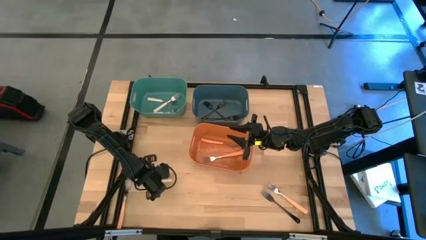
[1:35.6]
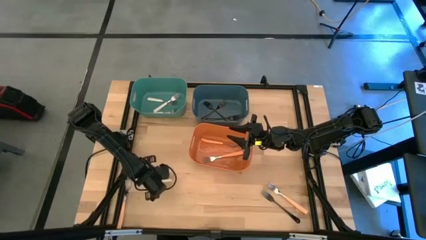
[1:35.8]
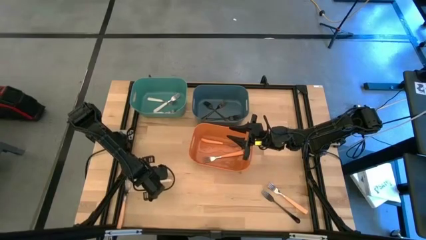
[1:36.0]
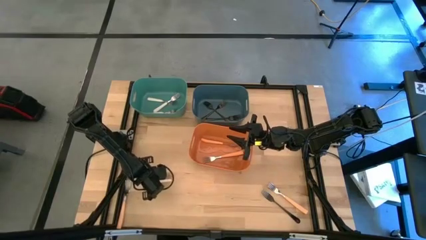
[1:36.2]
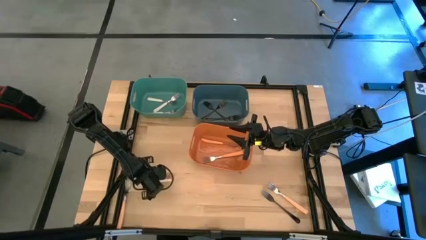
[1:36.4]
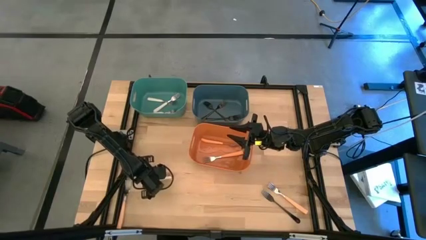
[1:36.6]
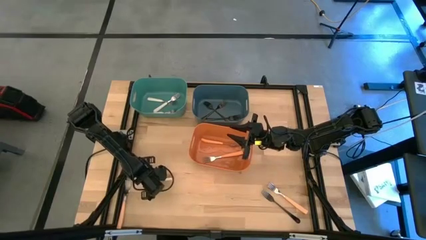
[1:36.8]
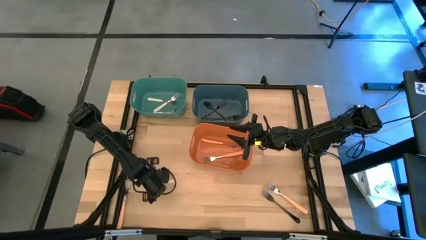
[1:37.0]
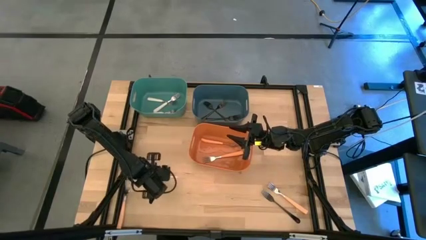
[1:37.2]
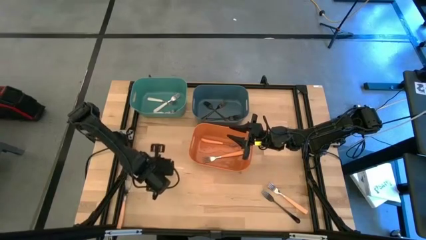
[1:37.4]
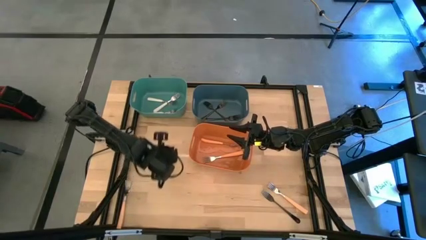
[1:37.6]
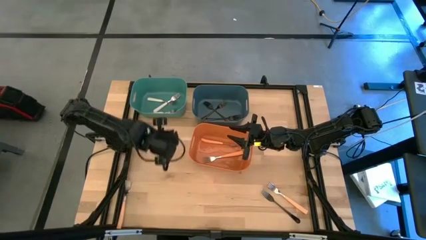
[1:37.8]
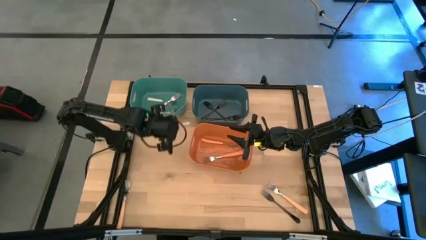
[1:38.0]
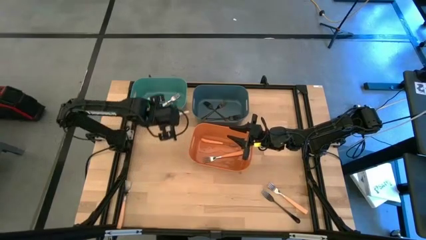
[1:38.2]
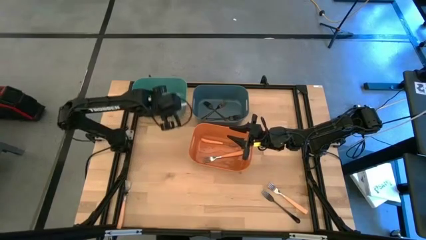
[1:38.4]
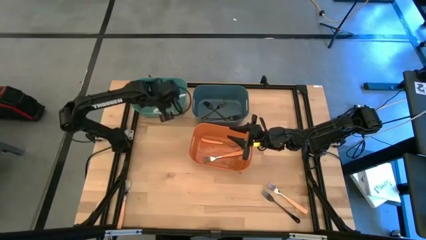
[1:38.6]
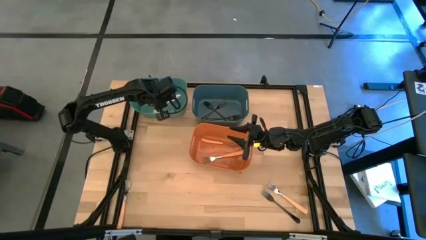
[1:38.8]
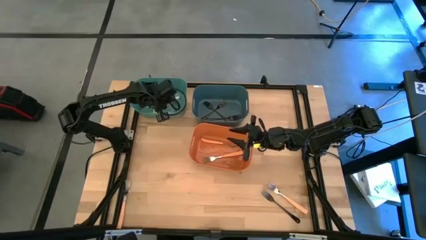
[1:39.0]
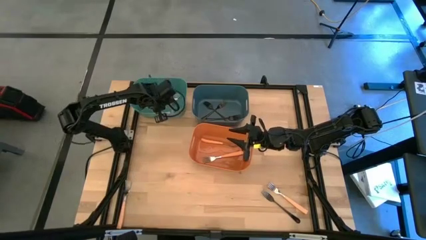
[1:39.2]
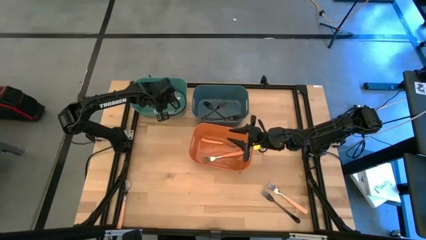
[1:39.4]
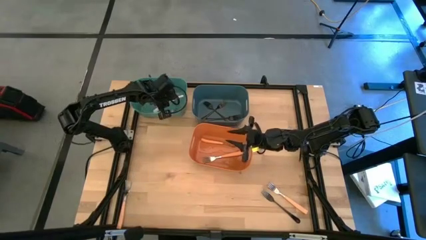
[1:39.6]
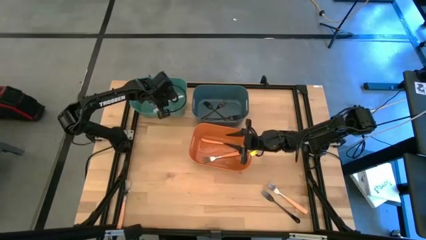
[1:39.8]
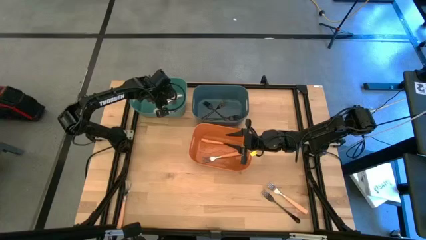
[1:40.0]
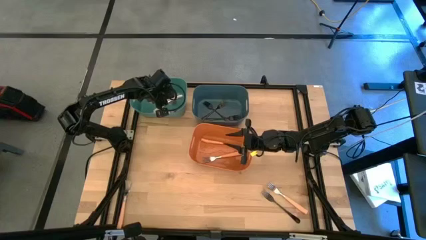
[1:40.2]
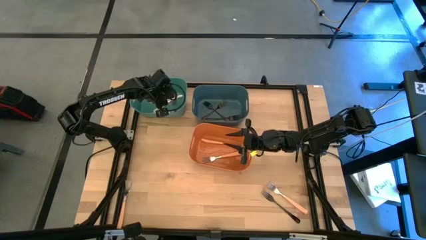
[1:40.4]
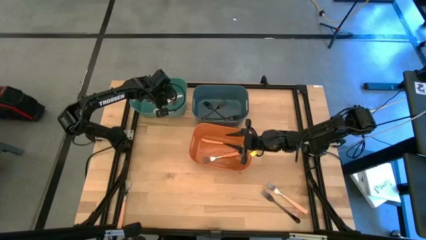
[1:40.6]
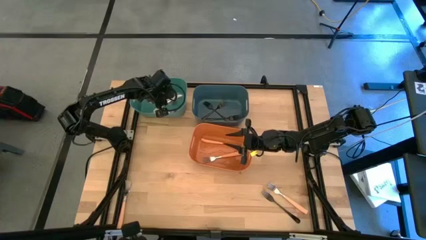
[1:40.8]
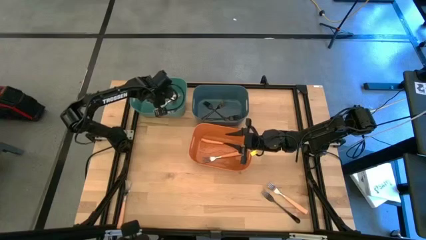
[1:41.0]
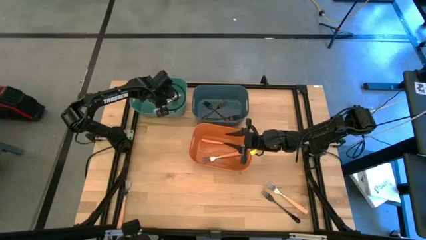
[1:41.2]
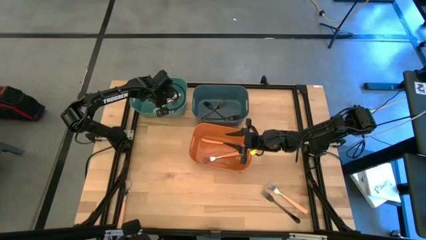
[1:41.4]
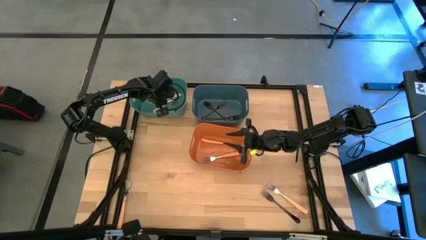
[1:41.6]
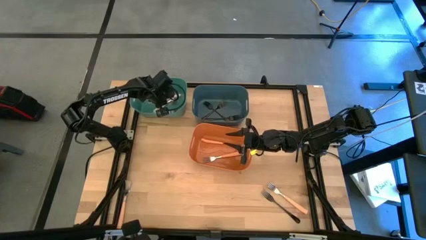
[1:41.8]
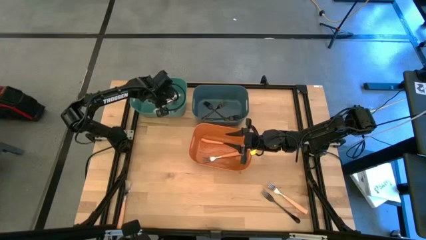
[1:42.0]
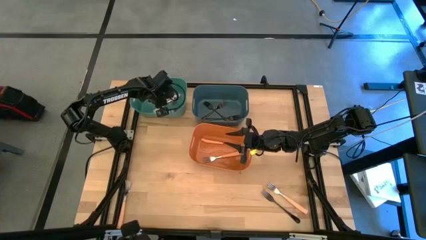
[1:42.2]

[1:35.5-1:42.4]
Task: Sort silverware by color (type)
Put the white fork into the green bin

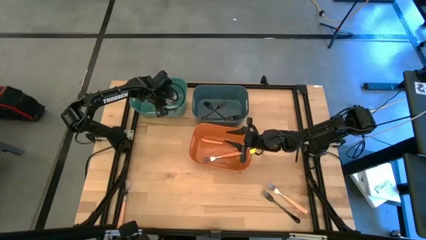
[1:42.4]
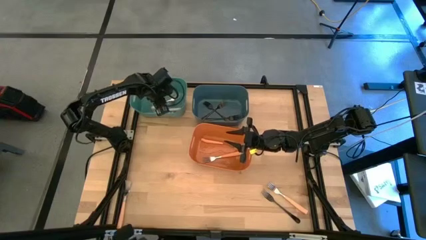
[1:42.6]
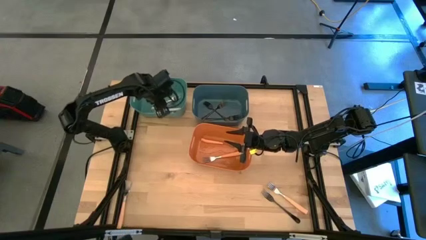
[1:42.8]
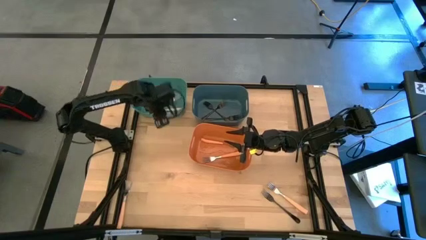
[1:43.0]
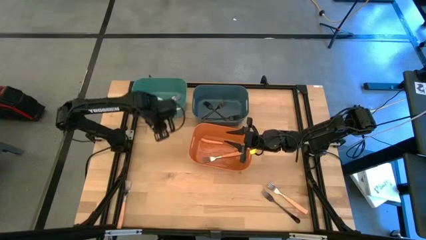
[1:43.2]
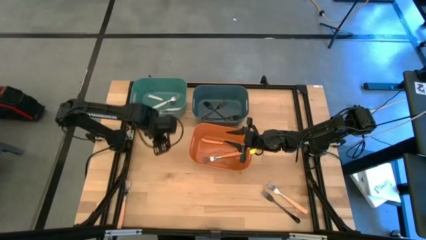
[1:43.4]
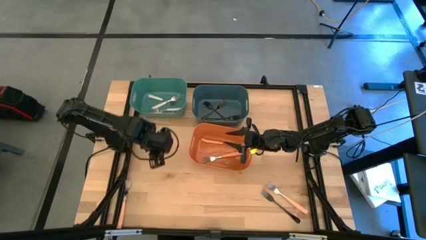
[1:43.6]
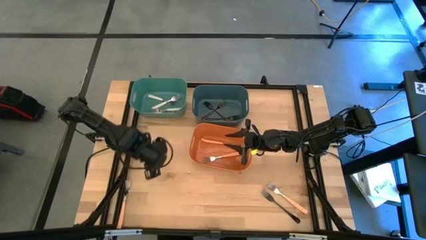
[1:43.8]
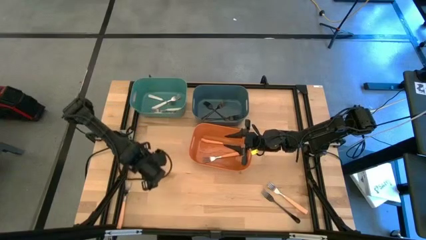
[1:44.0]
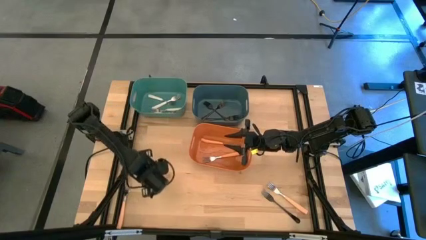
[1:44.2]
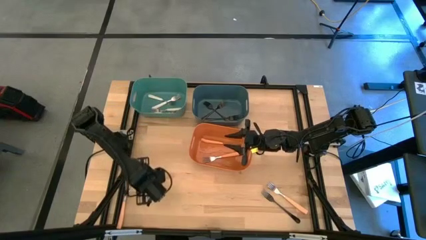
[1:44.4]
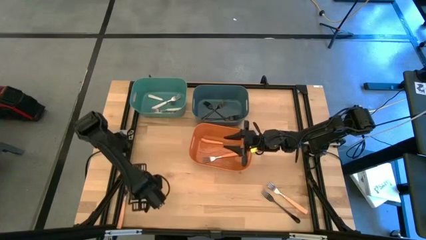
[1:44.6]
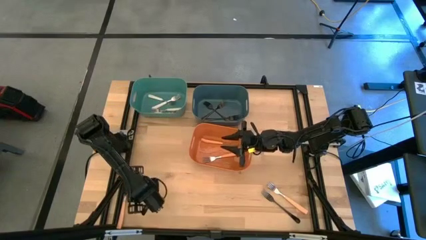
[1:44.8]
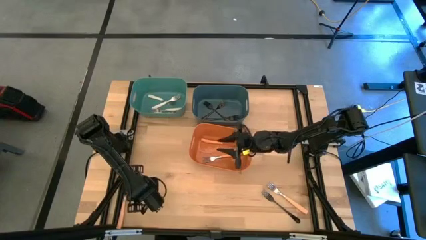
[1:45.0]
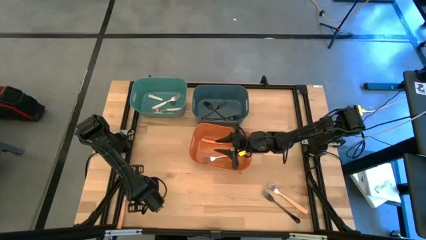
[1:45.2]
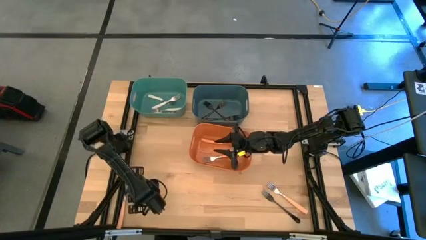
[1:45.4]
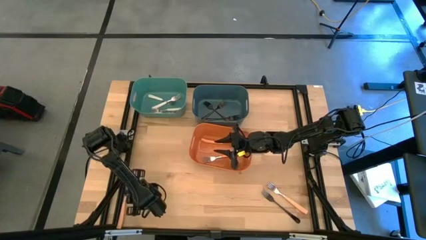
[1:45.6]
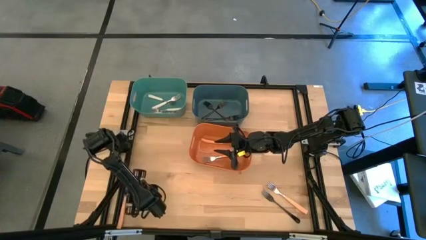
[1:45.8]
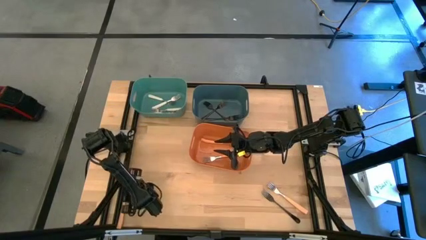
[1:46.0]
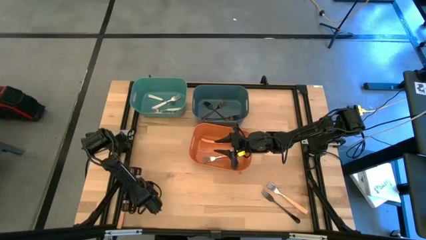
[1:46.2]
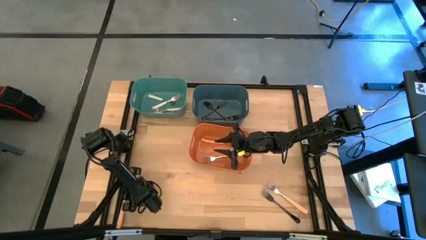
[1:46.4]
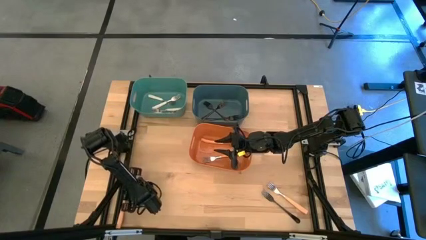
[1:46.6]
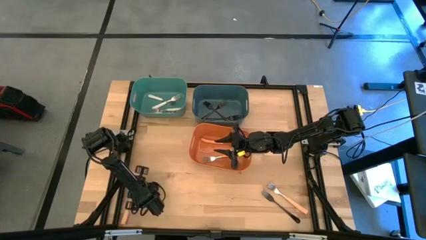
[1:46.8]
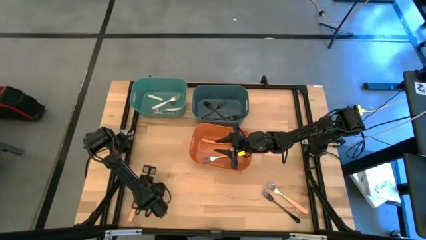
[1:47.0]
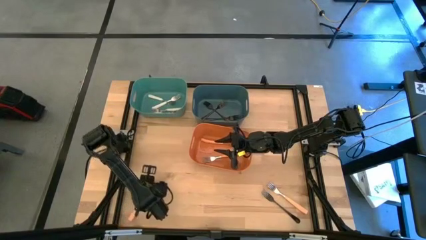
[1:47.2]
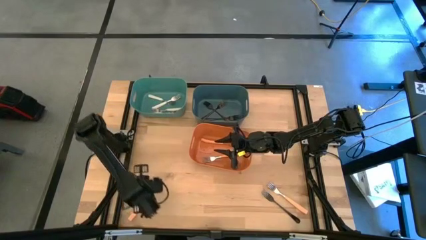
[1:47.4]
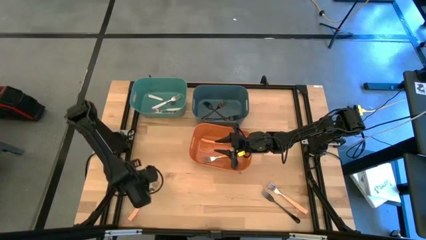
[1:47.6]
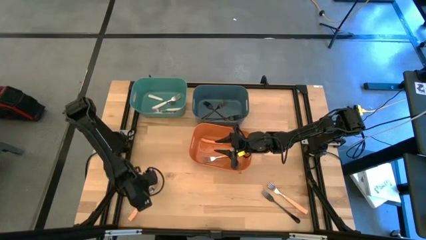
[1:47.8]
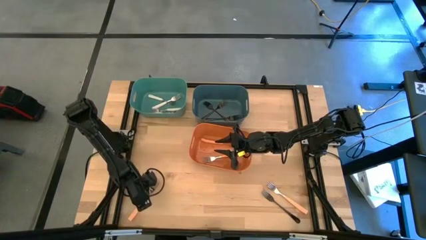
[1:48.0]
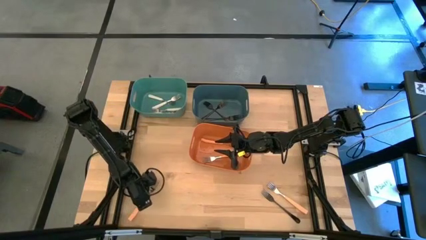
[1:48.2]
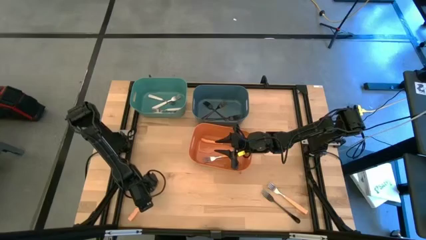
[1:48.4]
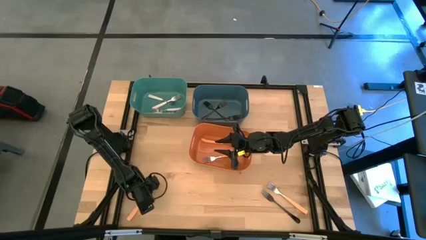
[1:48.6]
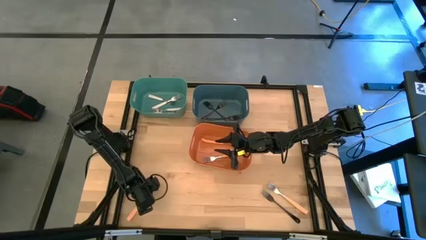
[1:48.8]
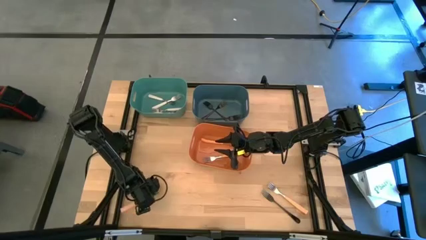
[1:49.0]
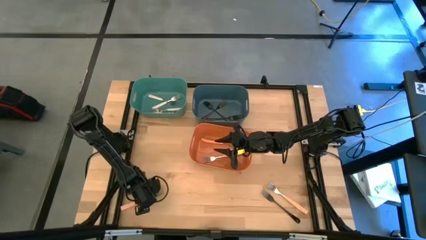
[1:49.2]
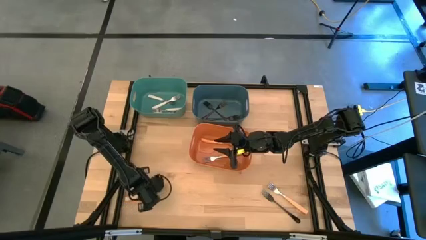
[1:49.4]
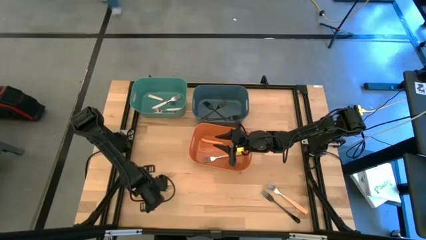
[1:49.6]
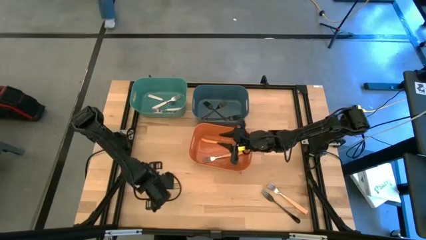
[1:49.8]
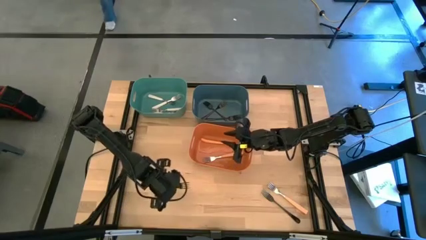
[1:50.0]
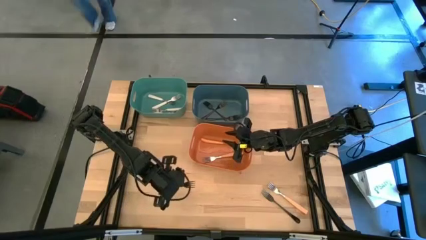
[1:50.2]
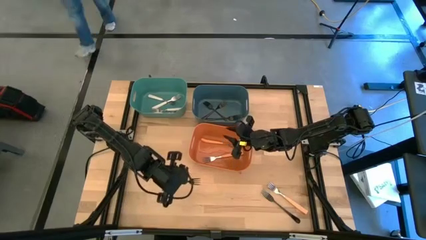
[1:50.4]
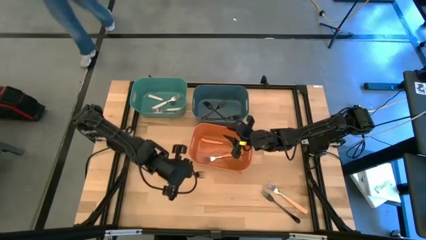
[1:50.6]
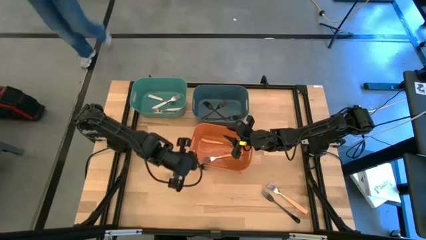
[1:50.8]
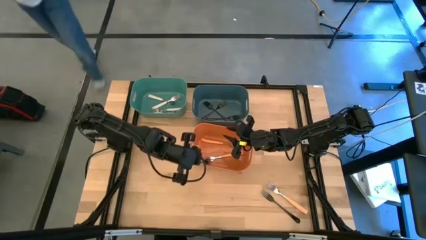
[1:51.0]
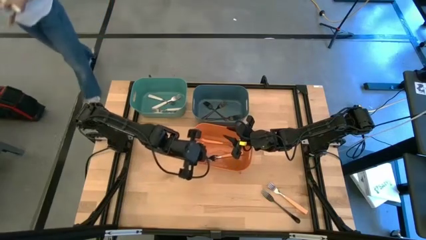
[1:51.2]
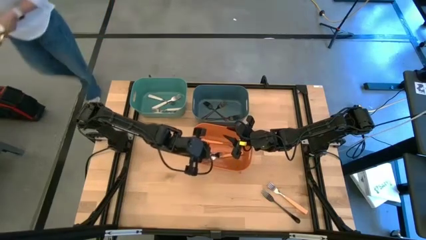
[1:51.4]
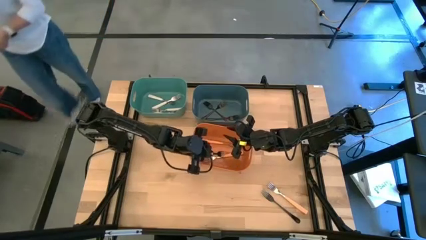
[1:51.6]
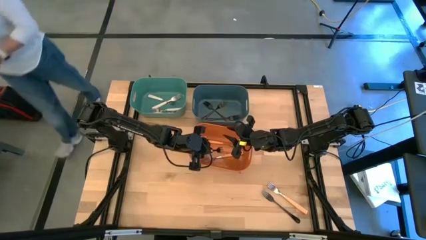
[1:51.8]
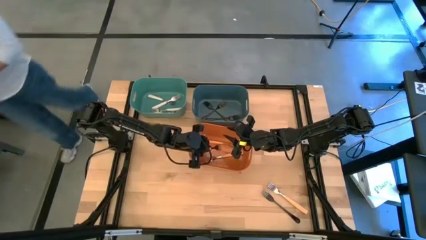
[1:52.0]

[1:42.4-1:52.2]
Put the orange fork into the orange bin
